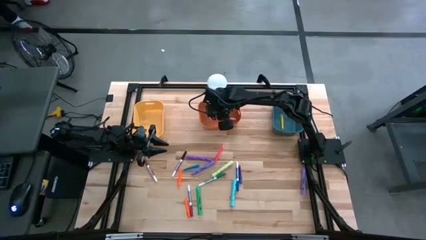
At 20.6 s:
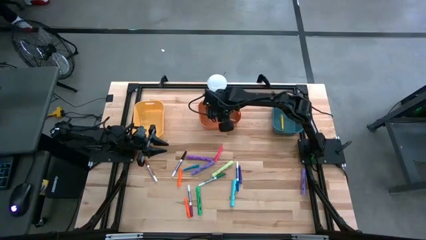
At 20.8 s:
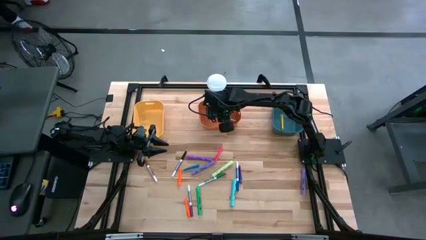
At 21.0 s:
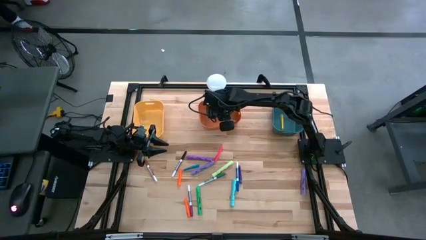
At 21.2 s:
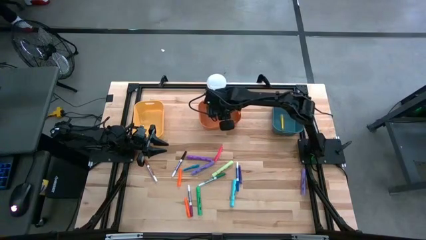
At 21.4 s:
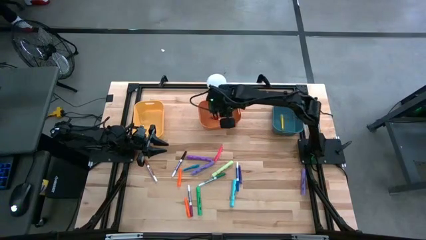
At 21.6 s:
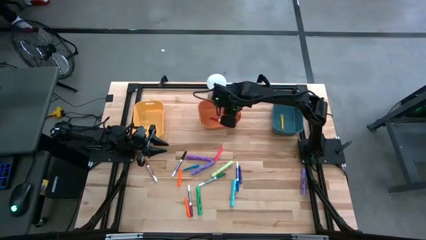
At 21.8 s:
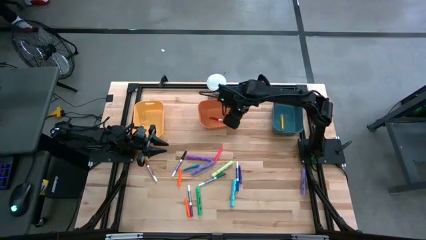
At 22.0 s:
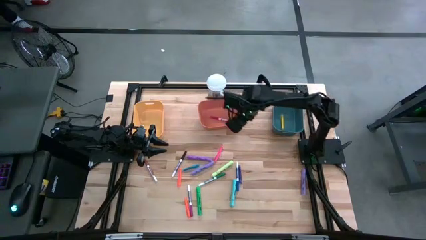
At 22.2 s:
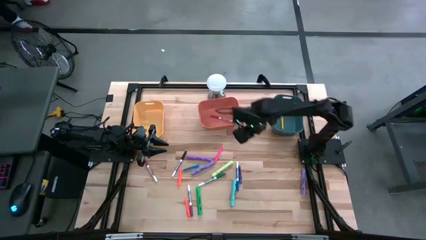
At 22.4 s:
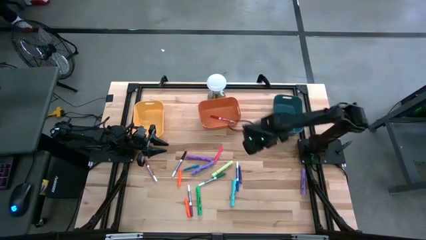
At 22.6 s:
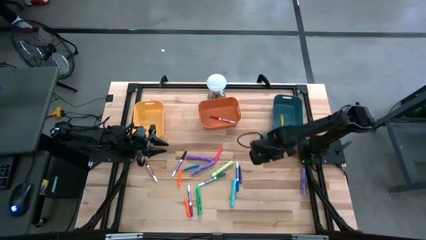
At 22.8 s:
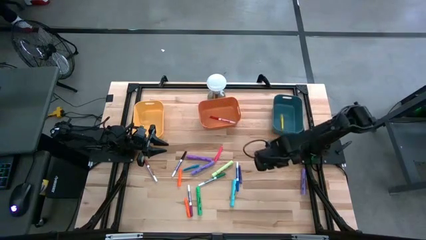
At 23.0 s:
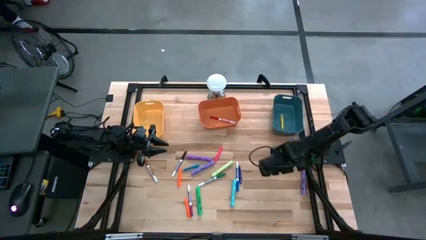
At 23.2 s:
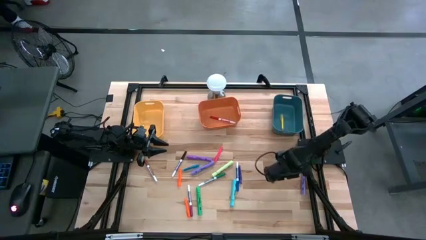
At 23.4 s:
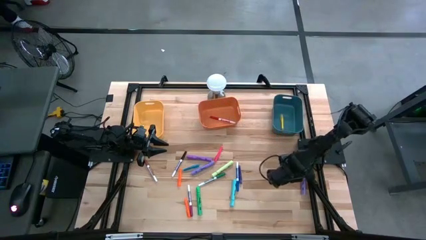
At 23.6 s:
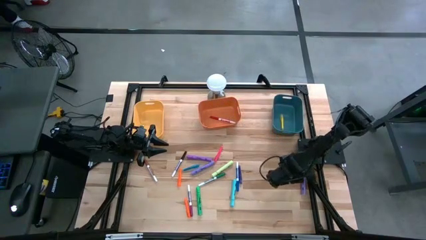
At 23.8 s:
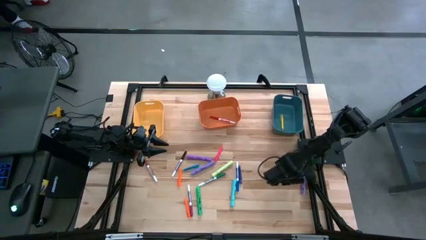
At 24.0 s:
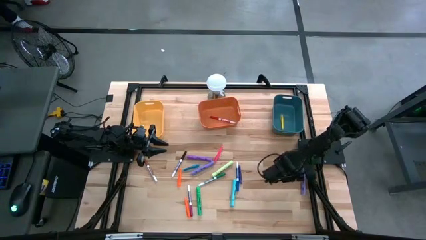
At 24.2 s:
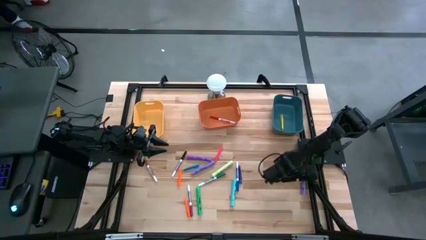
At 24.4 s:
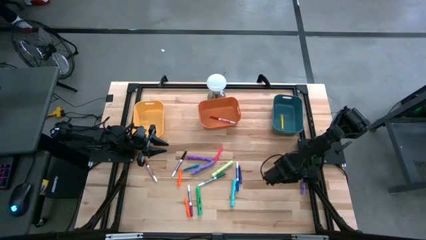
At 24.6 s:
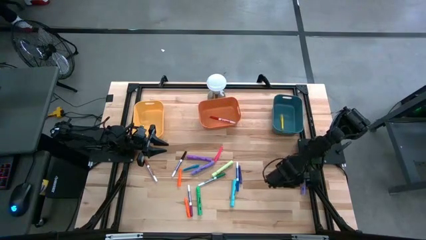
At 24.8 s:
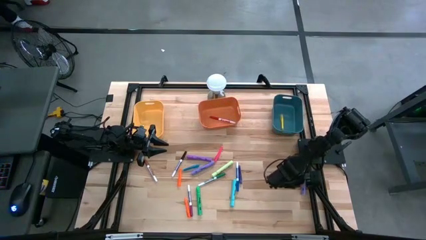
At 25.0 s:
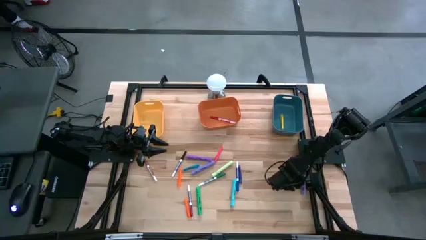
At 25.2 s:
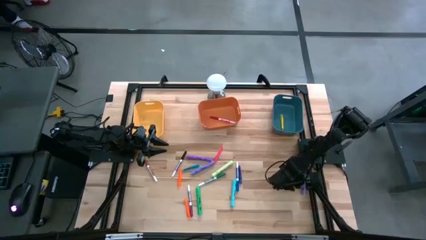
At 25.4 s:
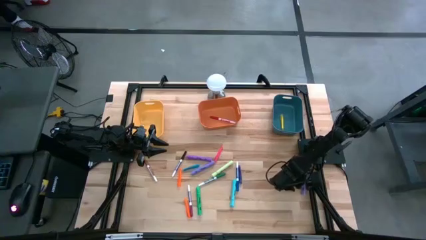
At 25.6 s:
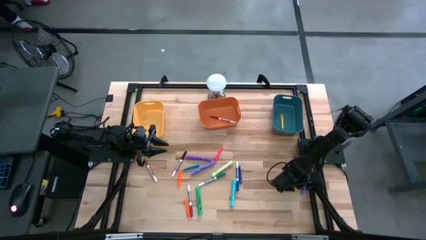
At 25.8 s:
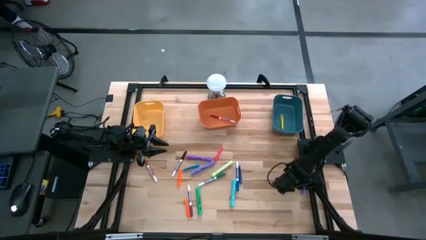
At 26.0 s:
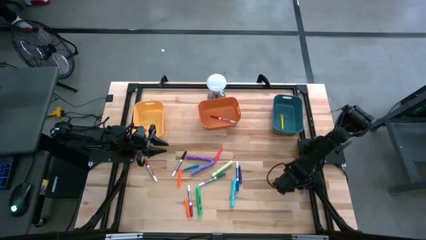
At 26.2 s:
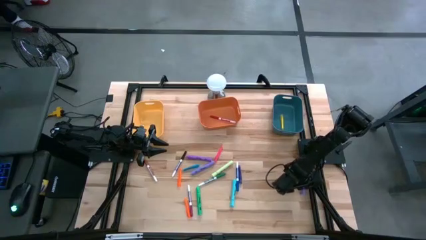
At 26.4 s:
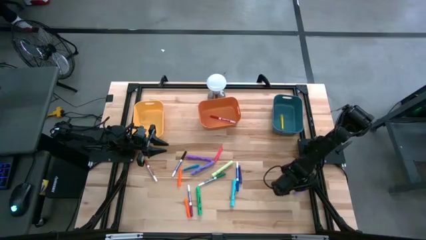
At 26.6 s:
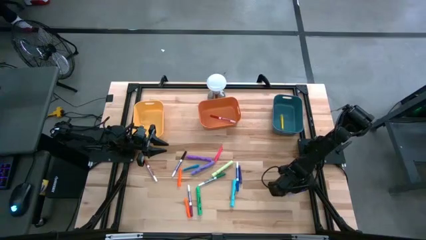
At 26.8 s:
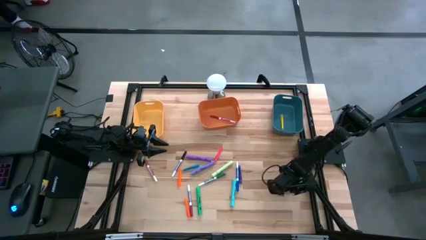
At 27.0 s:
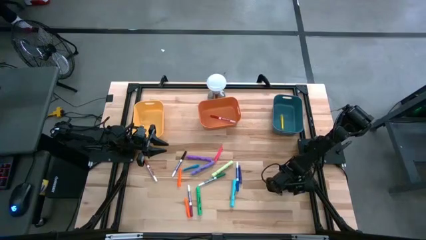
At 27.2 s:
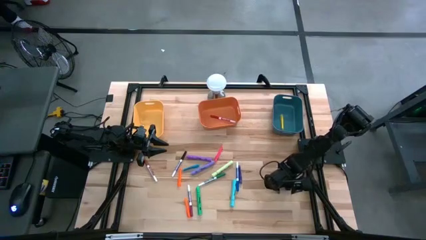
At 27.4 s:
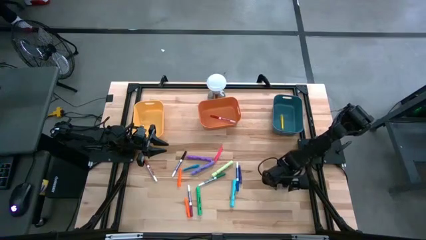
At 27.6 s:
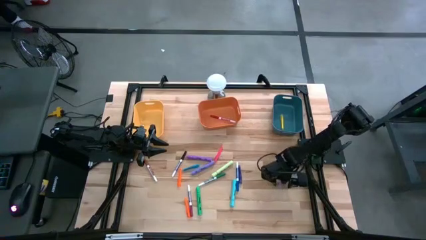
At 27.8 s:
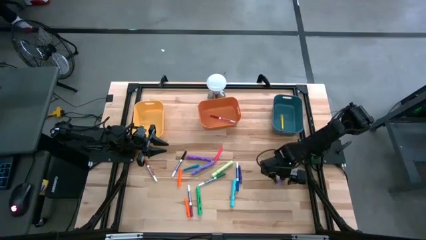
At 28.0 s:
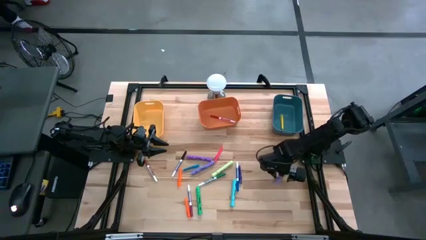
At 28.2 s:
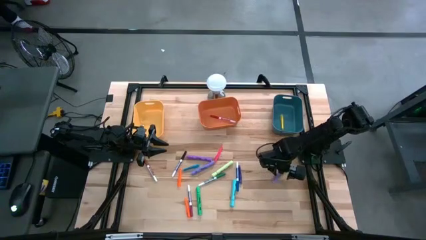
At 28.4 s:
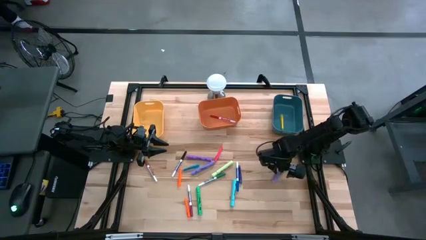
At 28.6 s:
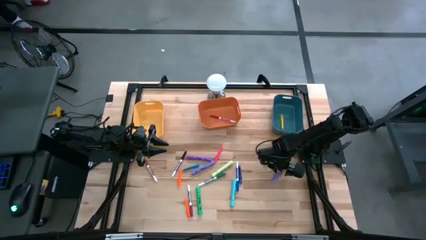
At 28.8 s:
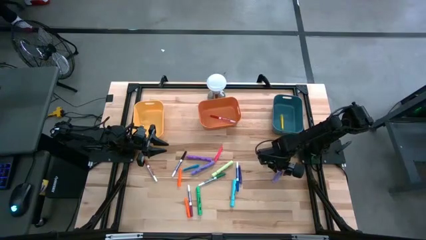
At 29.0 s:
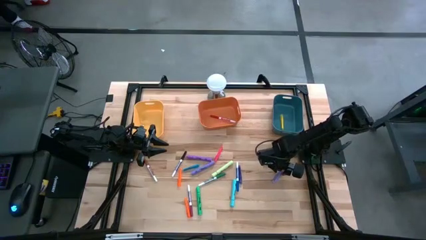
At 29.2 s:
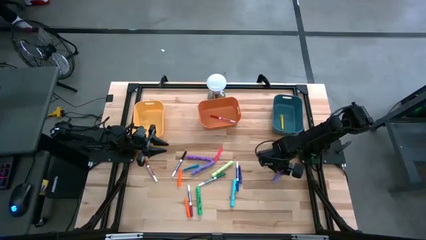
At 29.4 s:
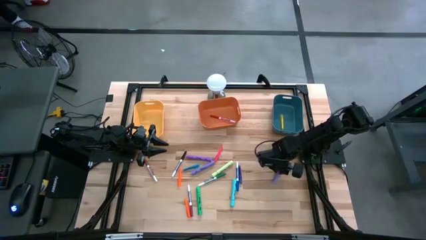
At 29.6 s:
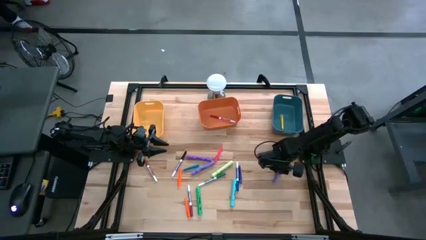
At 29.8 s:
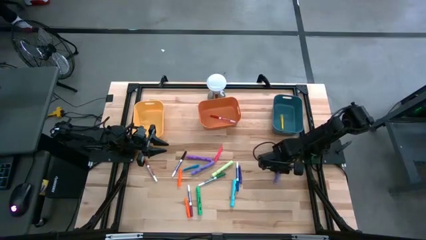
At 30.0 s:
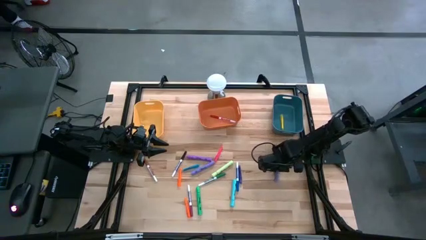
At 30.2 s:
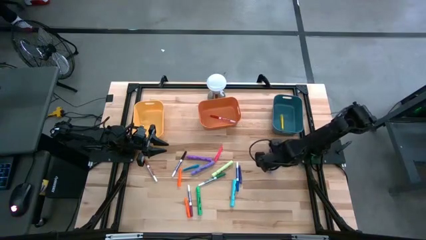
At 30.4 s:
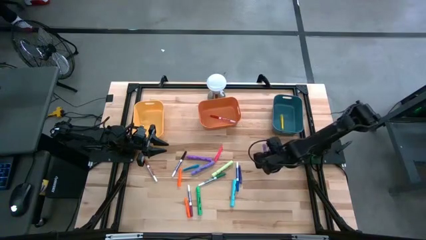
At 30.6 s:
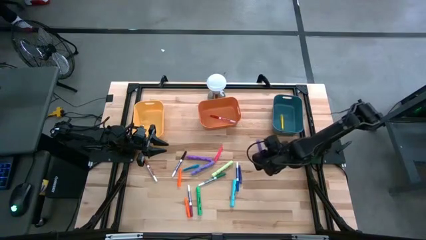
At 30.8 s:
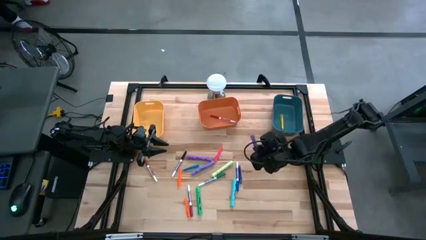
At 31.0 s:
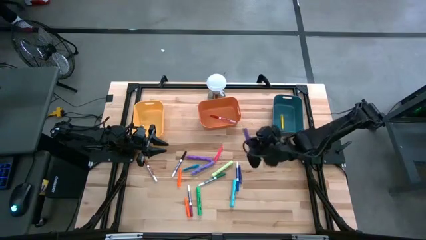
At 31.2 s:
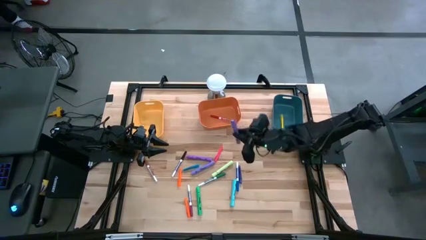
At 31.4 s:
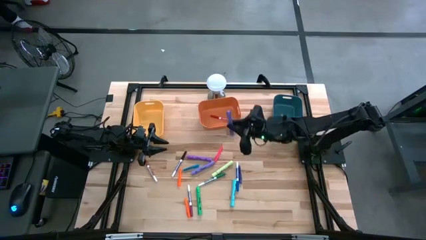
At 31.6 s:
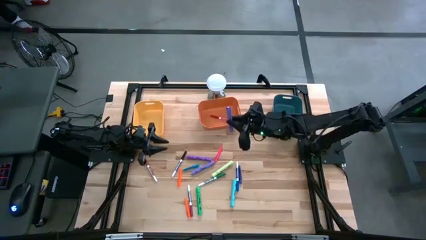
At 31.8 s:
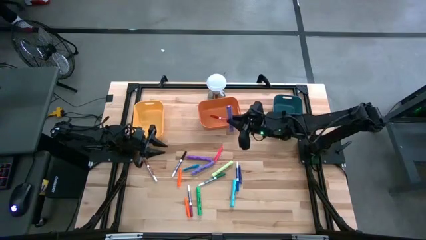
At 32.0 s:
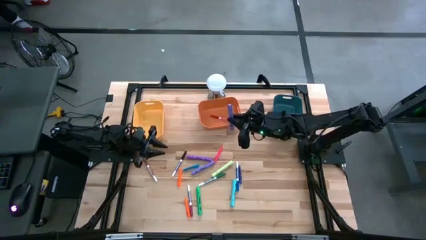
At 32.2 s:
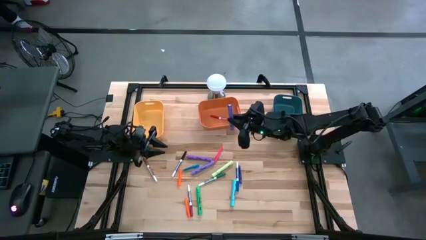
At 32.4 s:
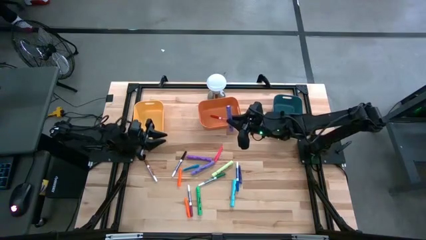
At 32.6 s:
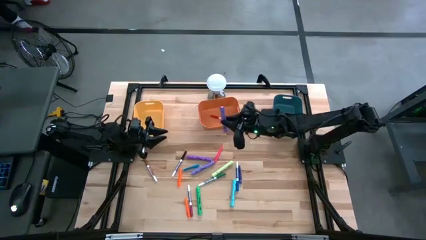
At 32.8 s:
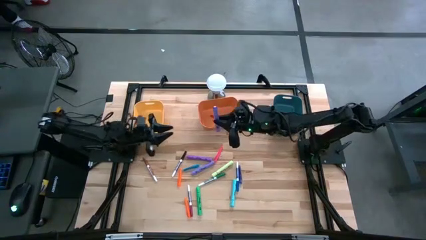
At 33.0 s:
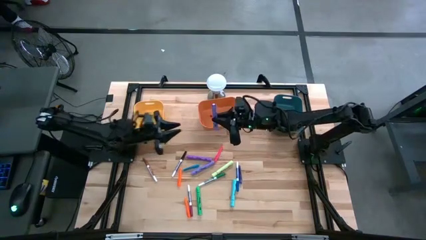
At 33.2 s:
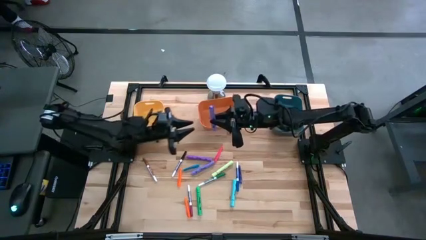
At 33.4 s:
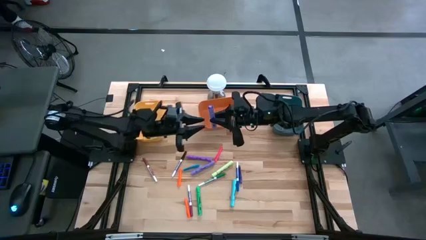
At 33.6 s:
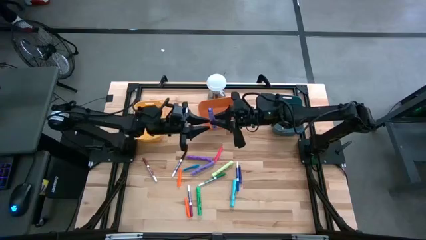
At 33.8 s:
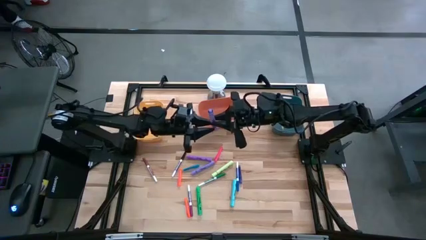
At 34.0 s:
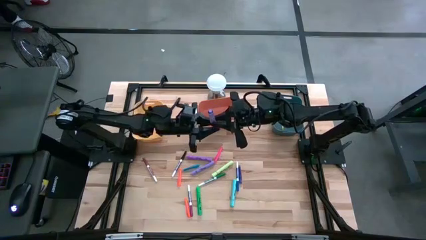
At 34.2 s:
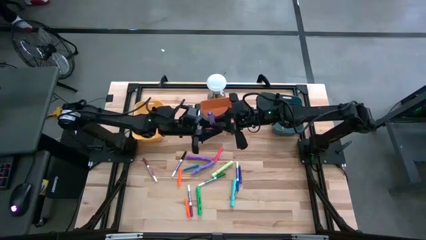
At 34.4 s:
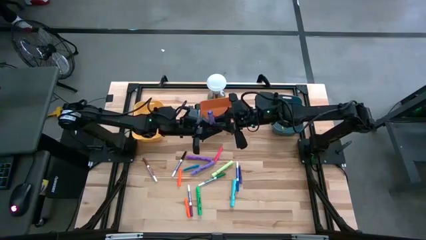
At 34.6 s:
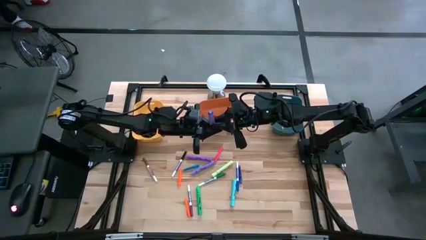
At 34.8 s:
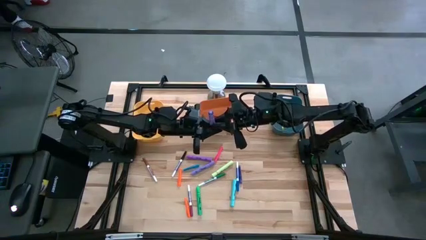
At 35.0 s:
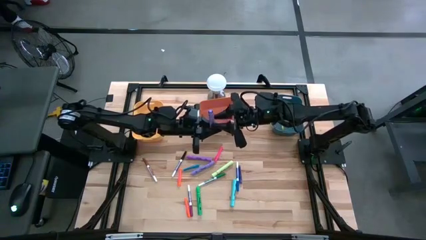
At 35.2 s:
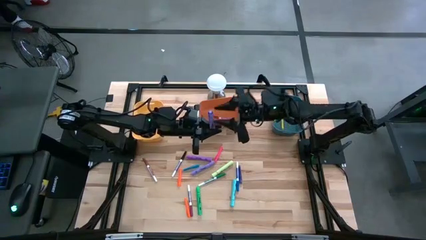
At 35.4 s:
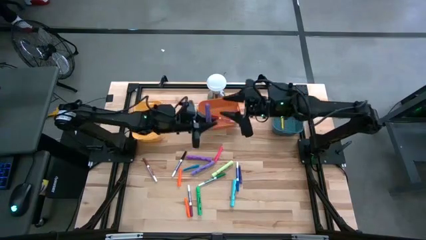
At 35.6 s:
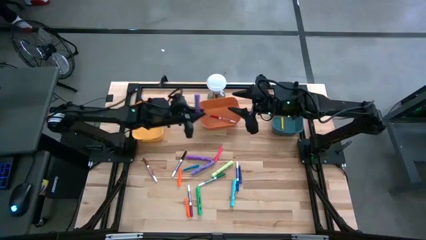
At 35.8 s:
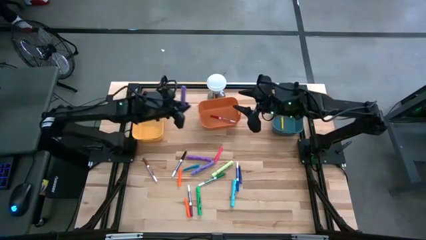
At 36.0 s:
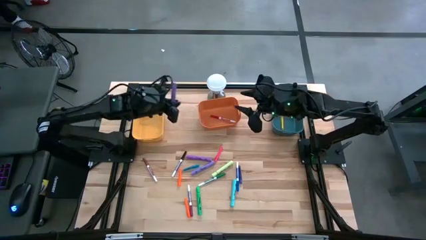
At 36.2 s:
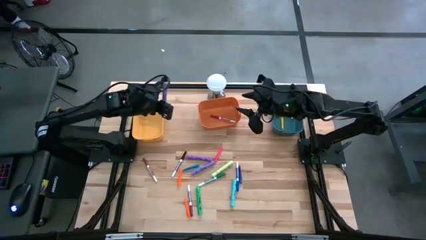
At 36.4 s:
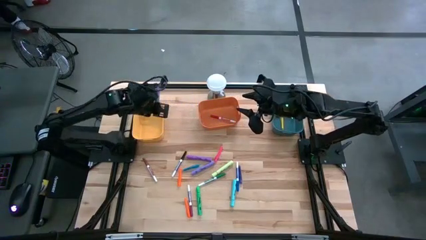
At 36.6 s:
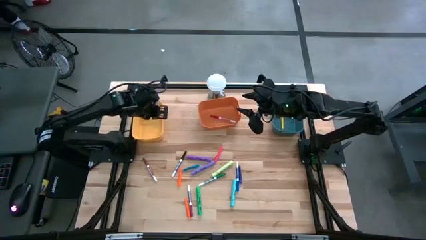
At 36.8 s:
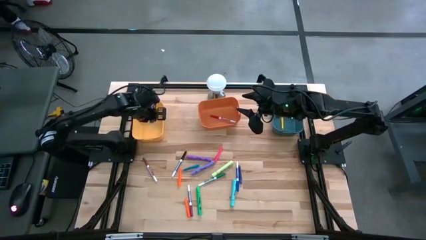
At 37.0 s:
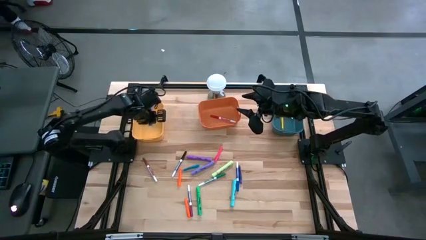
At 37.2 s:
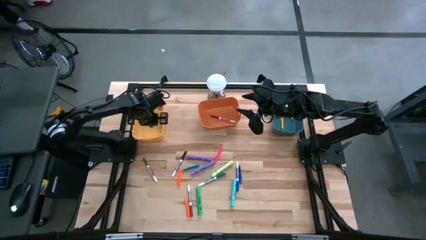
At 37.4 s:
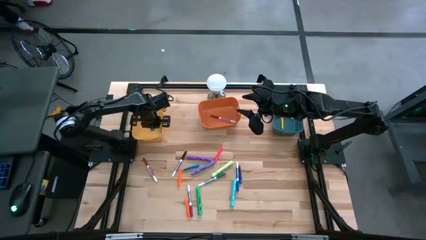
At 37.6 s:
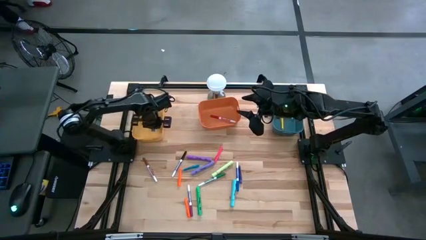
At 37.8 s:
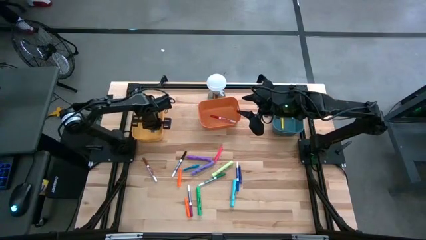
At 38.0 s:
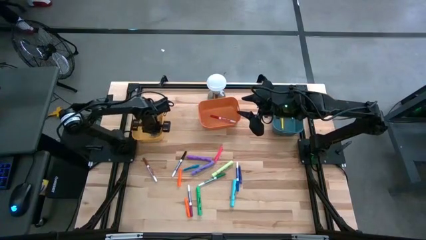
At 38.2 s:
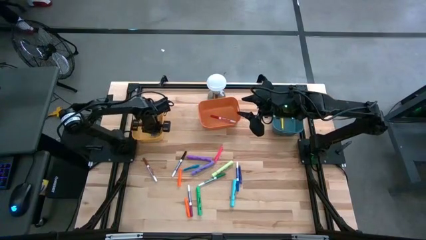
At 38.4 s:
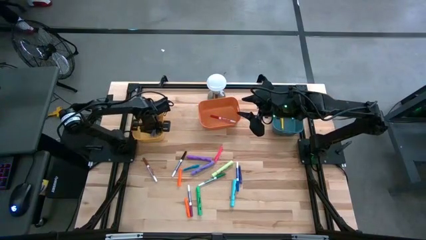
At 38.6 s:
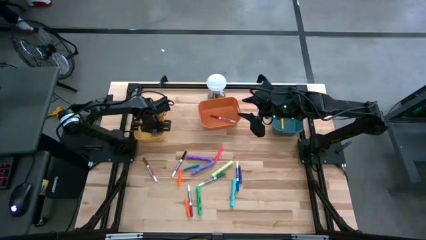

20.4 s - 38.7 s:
Task: Pick & Place Markers
Put the right purple highlighter pen into the yellow bin
